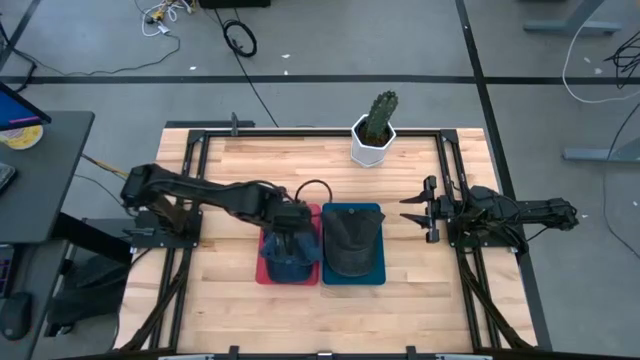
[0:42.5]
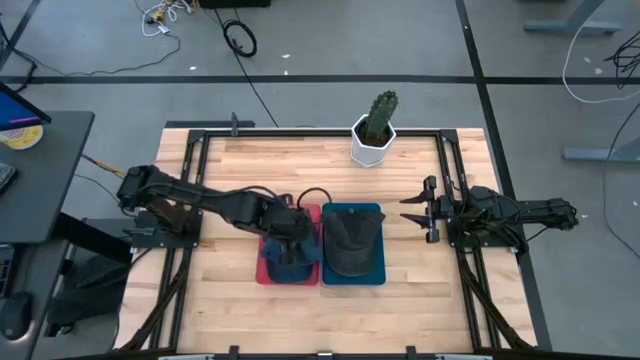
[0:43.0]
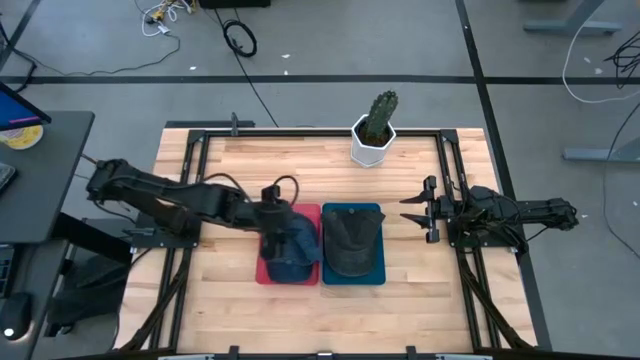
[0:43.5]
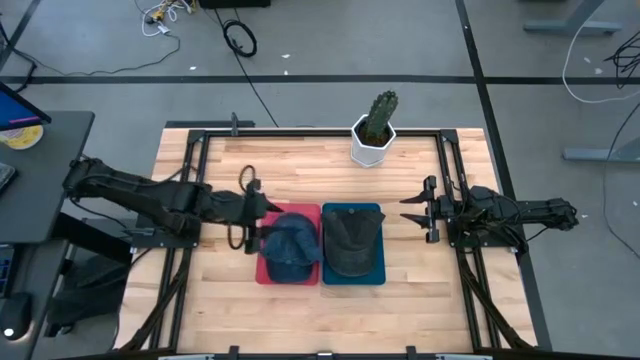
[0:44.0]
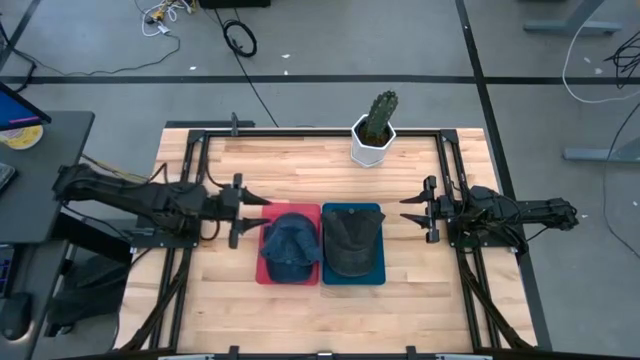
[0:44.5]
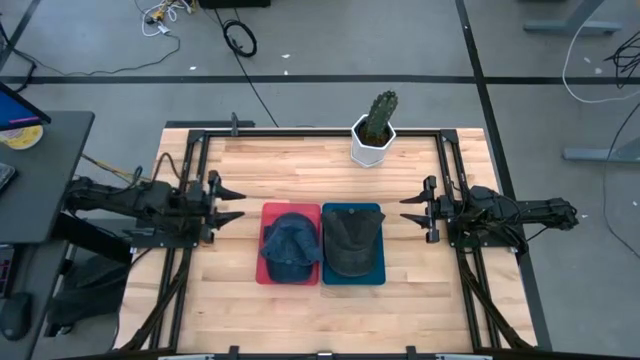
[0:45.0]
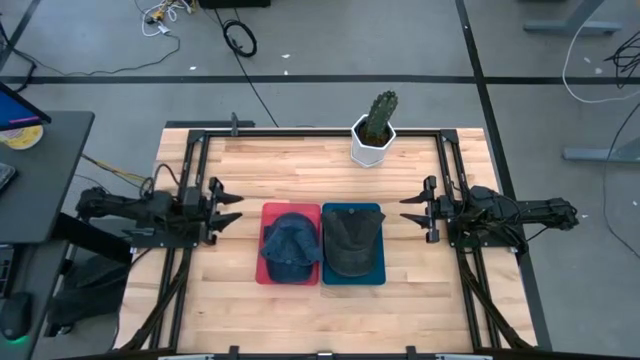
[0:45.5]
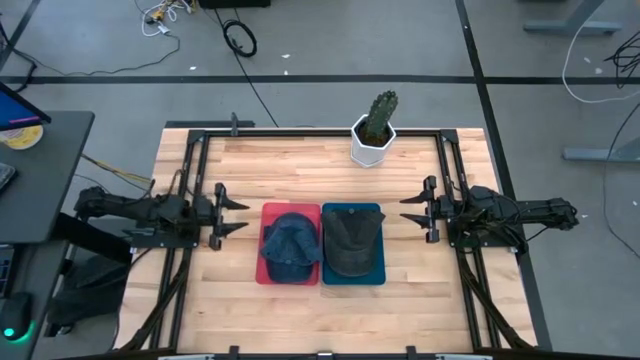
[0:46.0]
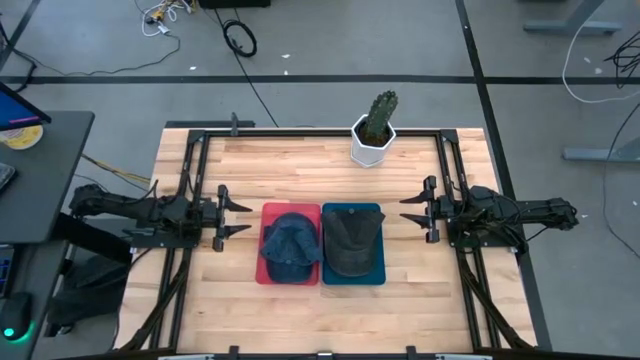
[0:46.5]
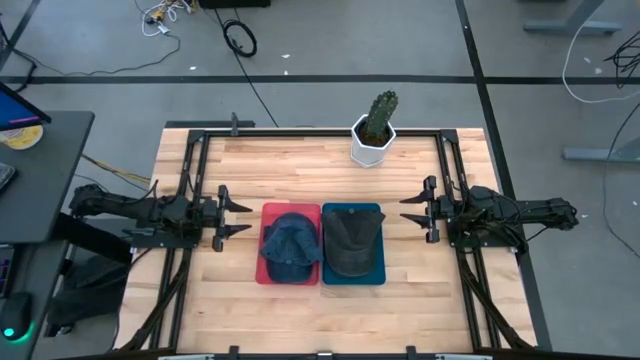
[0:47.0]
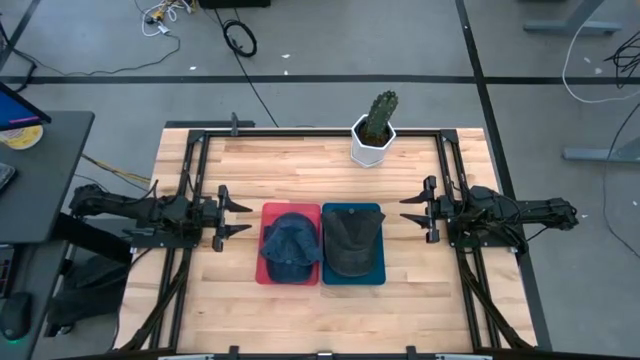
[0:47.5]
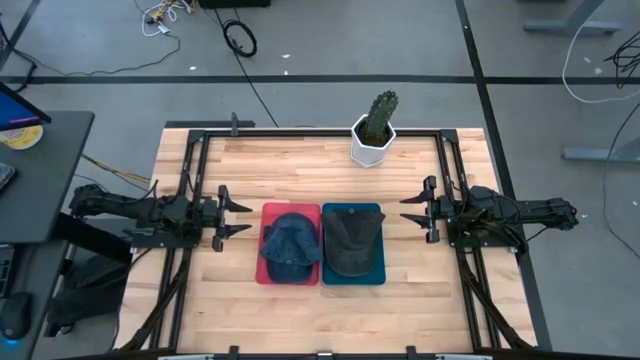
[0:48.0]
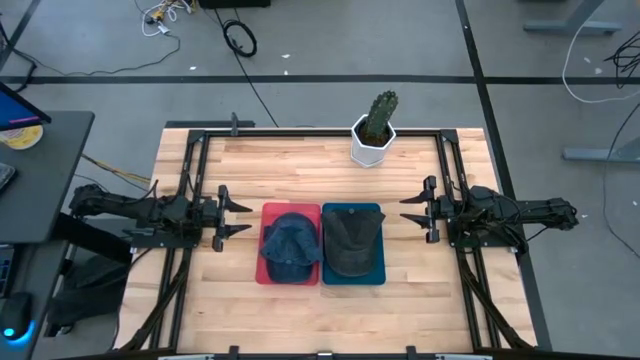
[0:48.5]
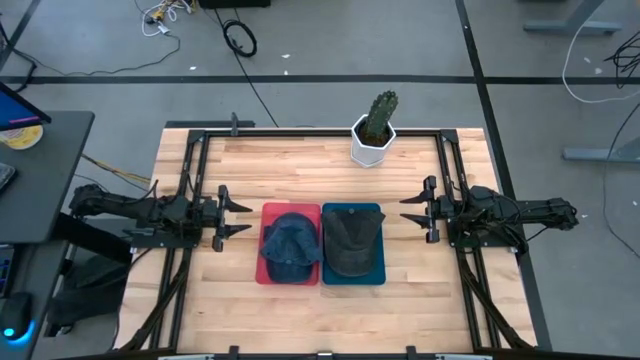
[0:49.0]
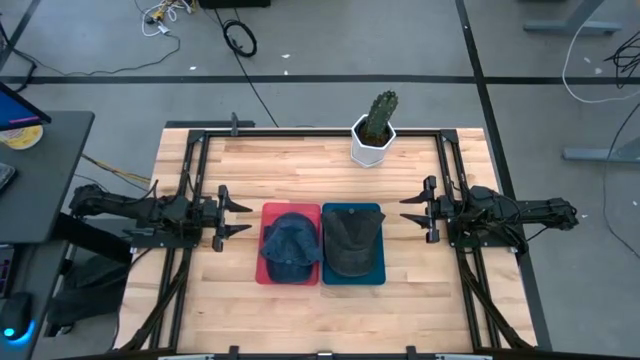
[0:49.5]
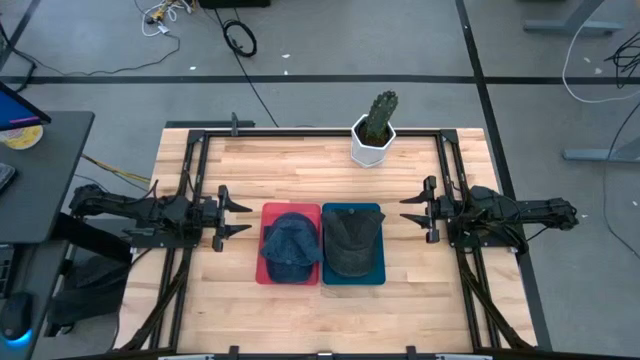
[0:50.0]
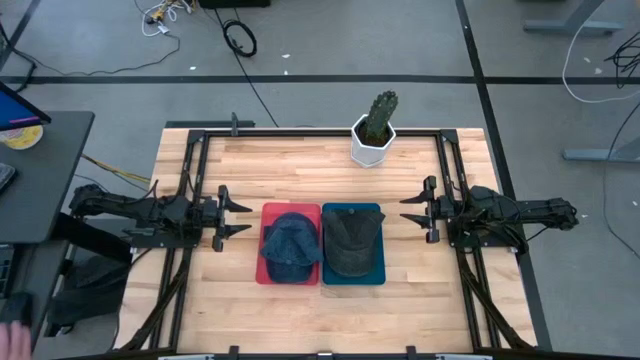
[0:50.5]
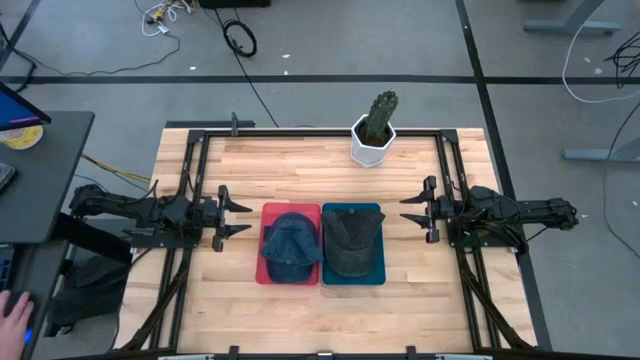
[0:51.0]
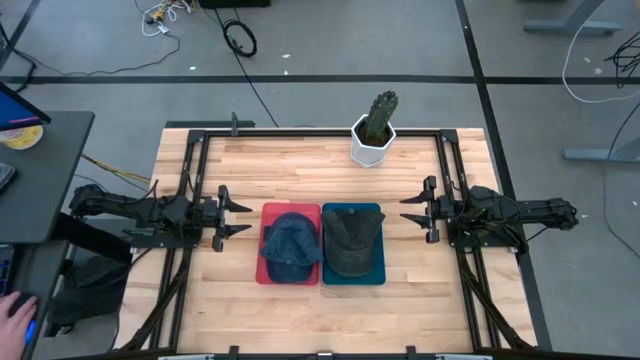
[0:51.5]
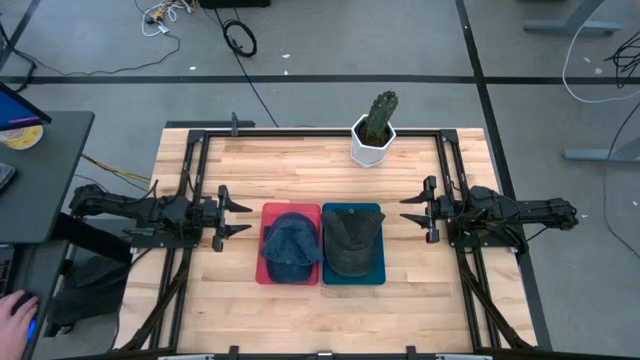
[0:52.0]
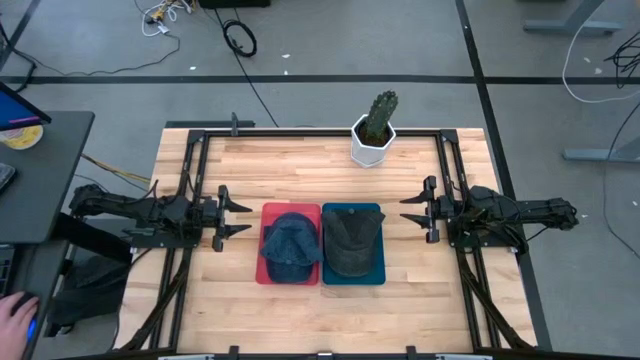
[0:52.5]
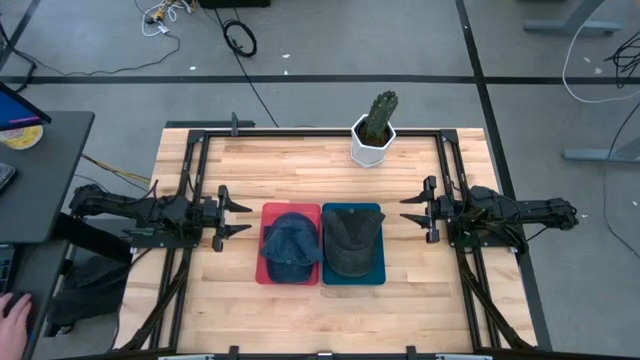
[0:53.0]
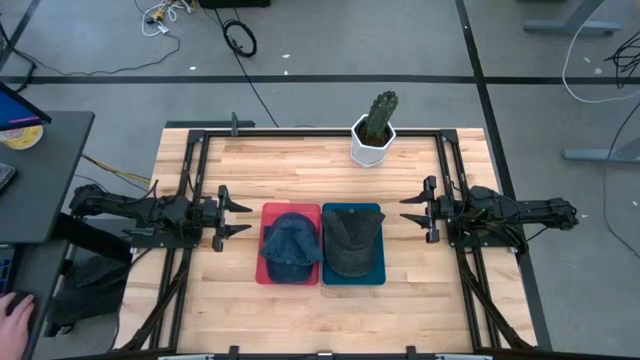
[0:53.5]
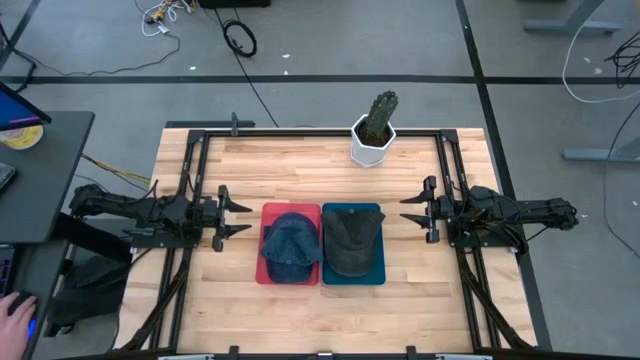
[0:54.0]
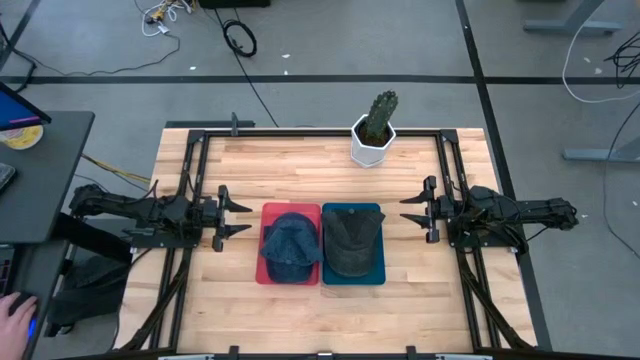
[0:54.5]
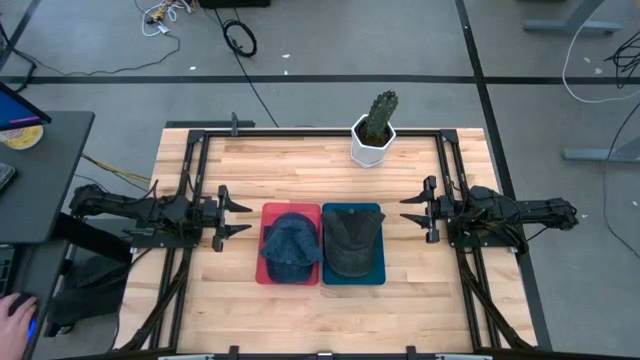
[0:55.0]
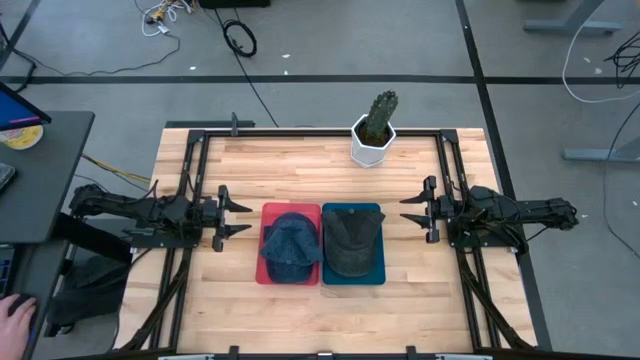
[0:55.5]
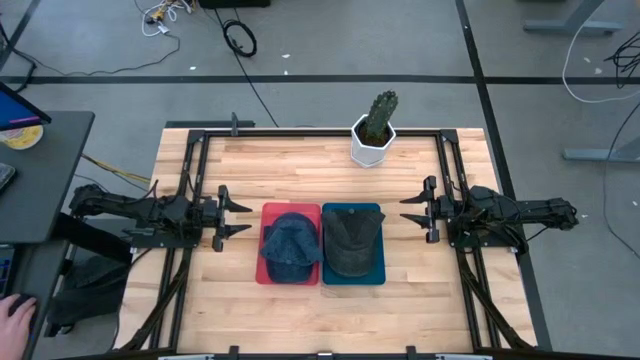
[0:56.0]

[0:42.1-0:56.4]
Task: Pick & Place hat
Return to Home Position

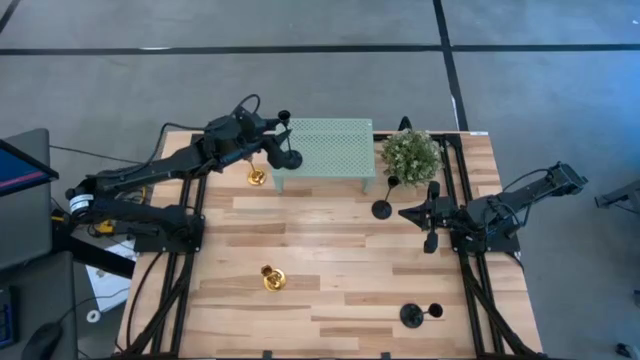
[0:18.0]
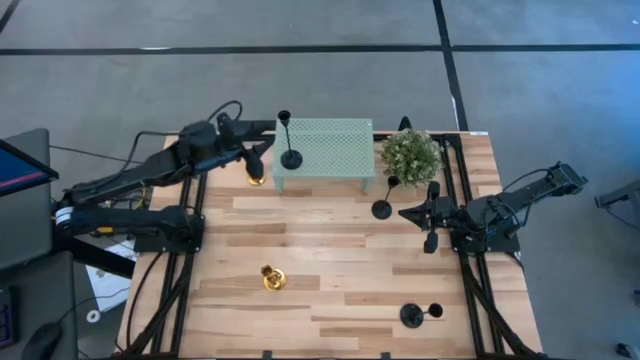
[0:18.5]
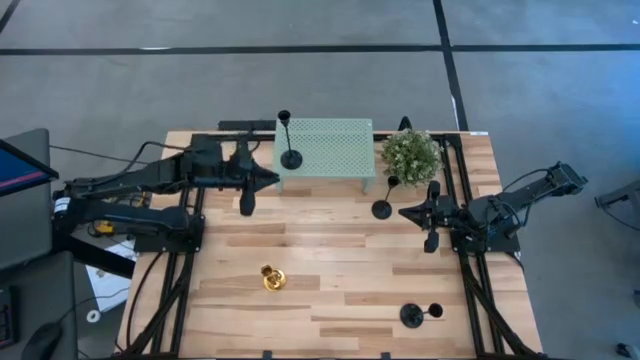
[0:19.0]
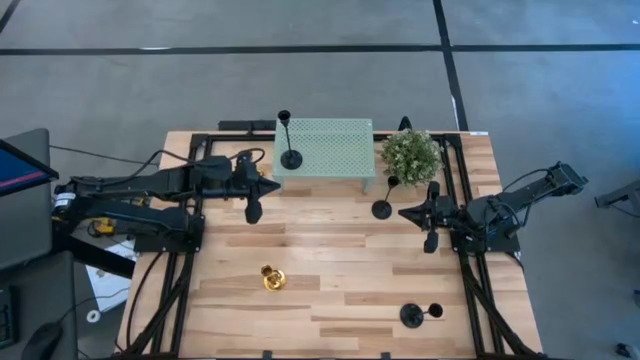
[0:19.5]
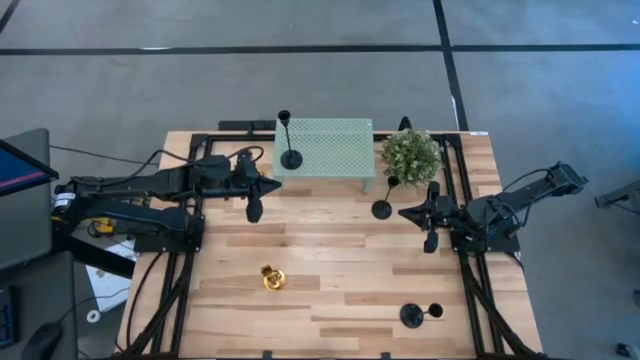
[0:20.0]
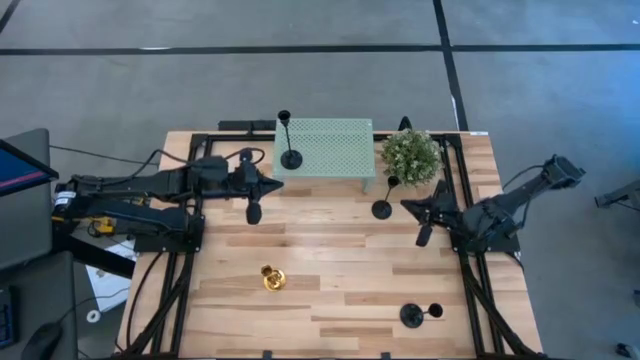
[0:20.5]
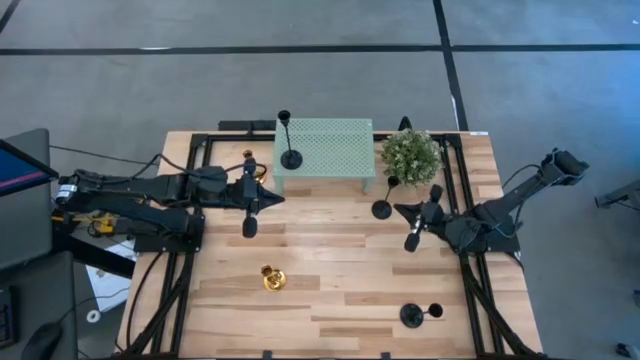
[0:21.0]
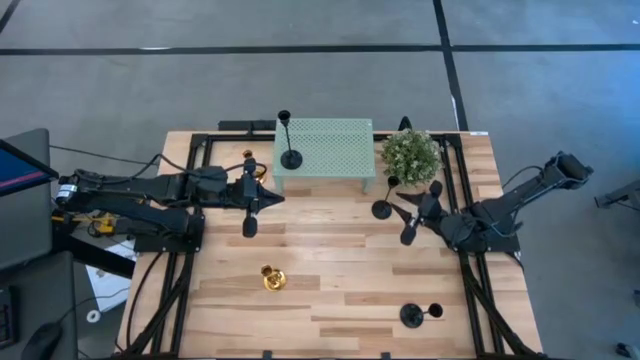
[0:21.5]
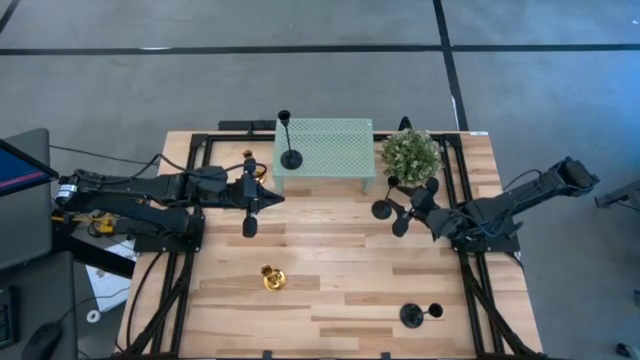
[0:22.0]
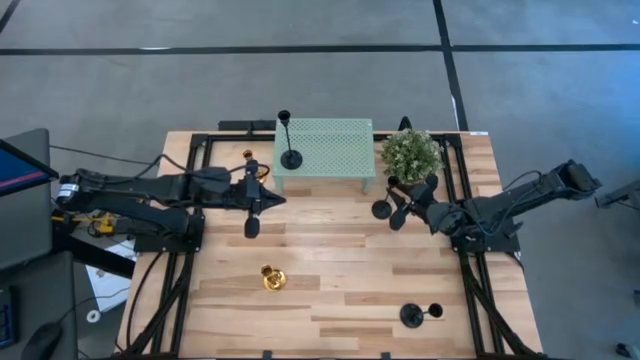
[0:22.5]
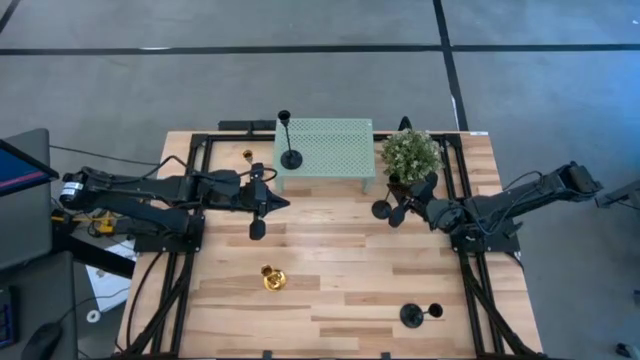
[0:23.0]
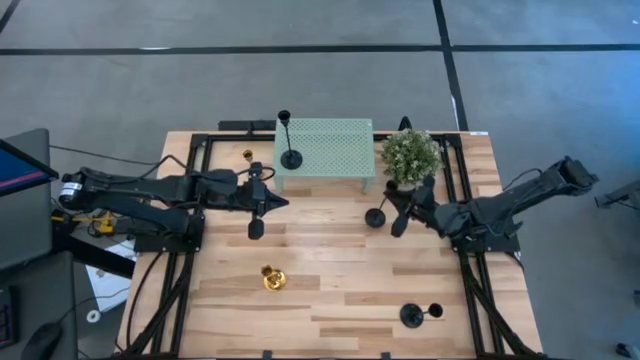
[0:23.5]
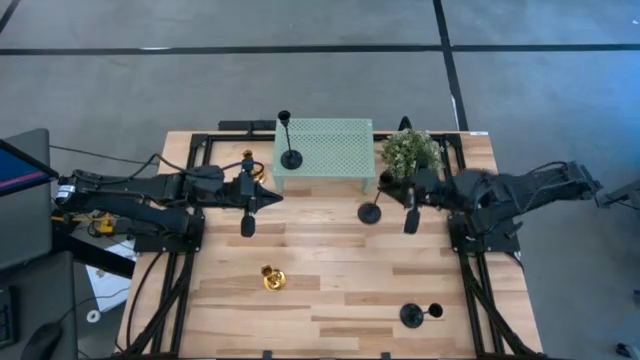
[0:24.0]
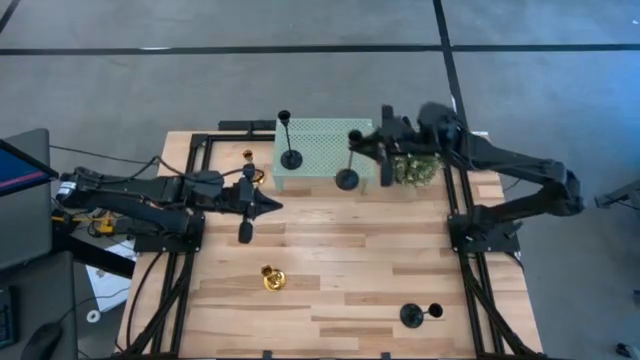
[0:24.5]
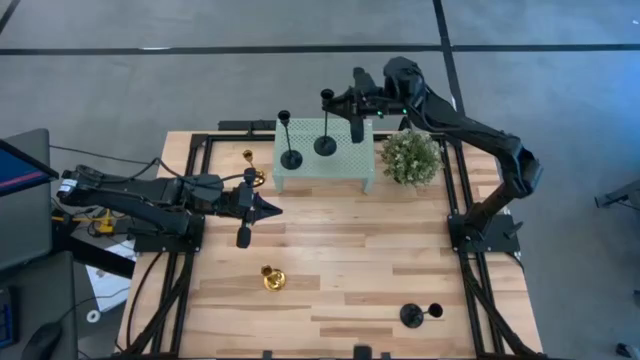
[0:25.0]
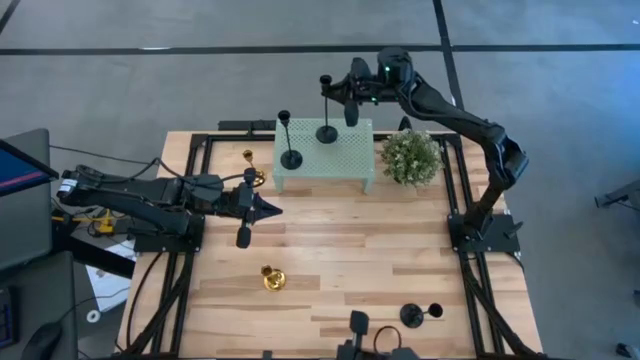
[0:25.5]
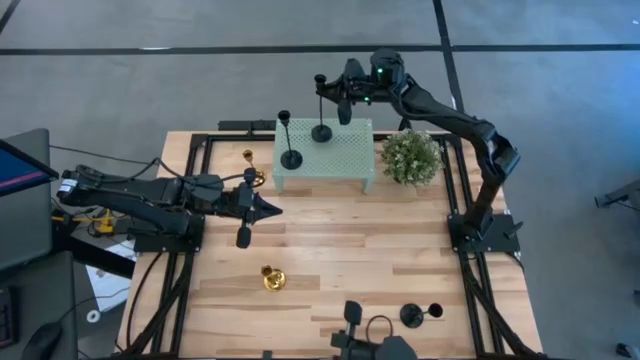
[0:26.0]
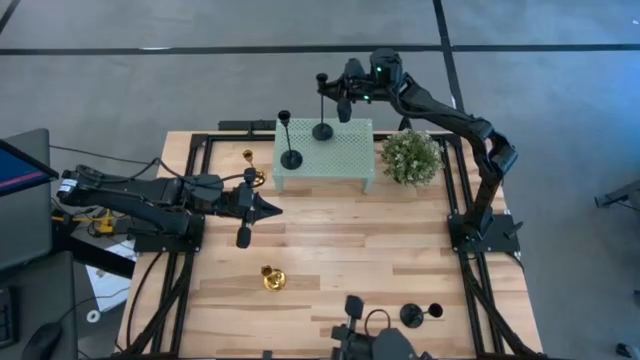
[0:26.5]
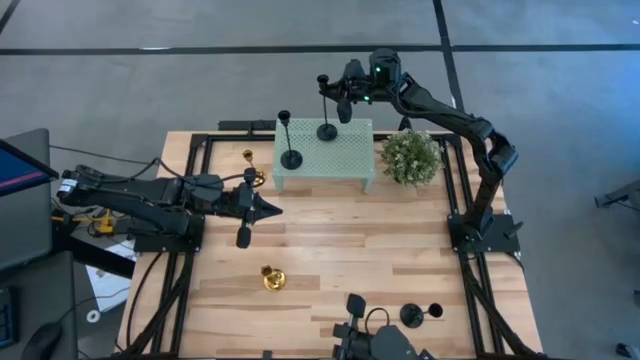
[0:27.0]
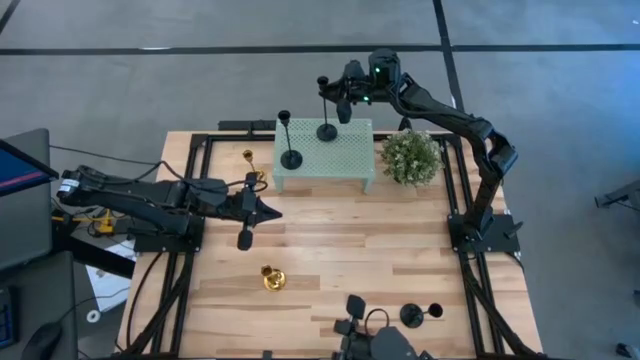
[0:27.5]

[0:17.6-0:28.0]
Task: Pick & Place candle stick holders
Put the top black candle holder on the shelf
